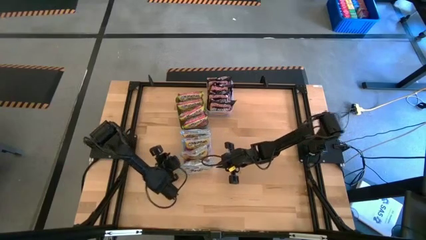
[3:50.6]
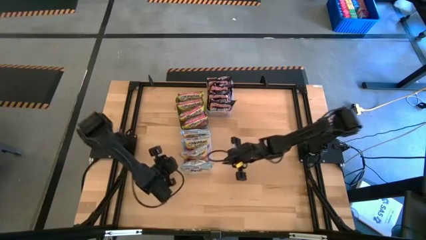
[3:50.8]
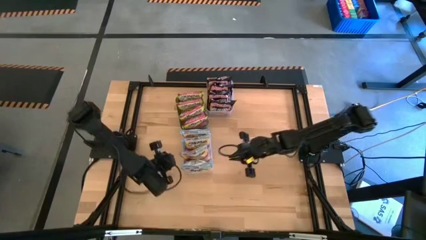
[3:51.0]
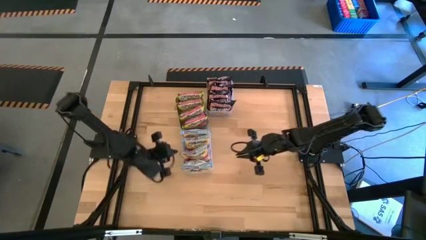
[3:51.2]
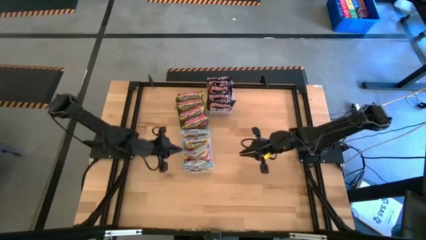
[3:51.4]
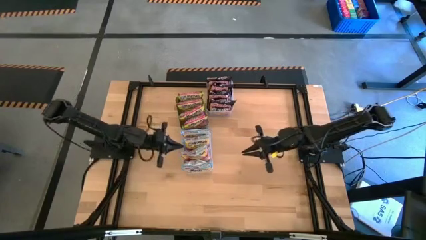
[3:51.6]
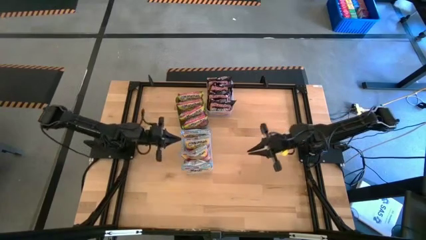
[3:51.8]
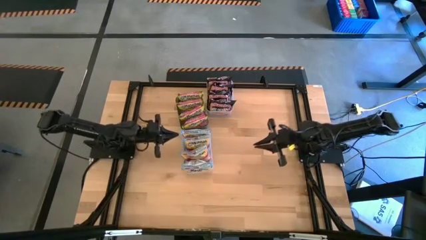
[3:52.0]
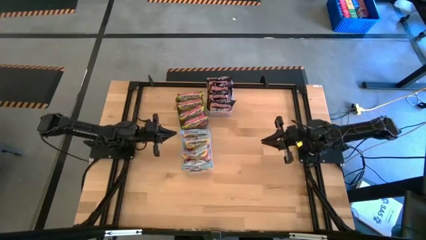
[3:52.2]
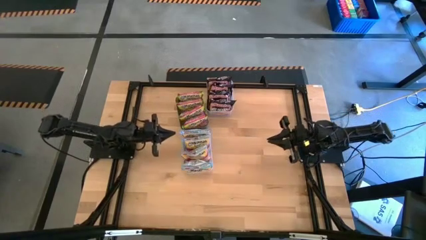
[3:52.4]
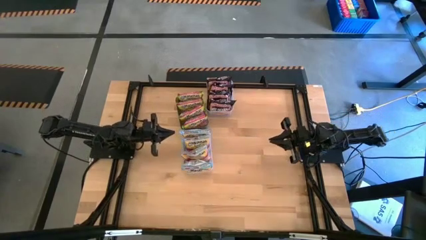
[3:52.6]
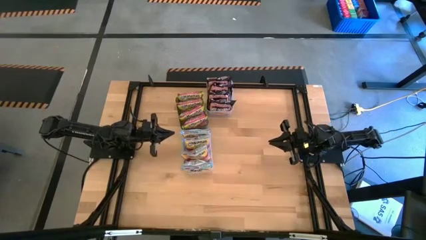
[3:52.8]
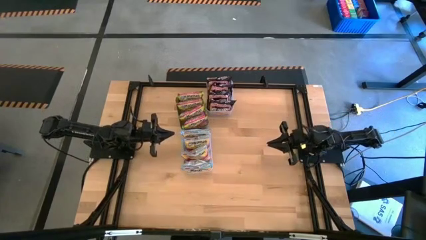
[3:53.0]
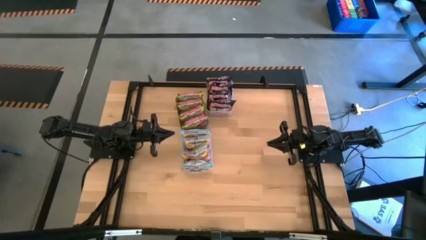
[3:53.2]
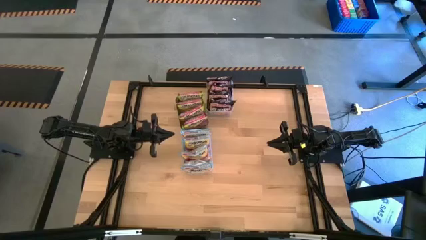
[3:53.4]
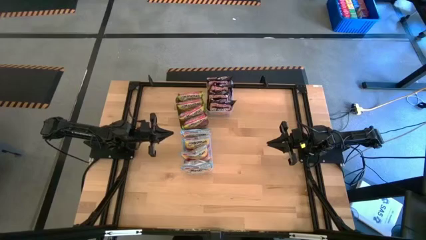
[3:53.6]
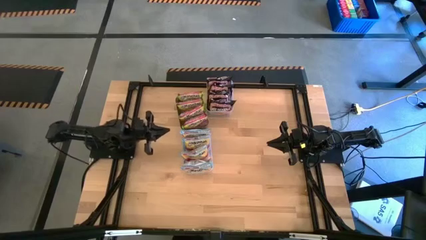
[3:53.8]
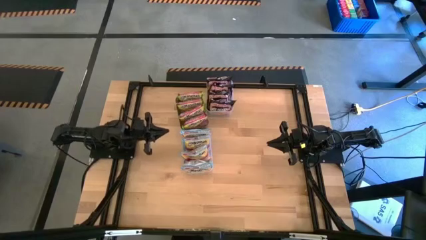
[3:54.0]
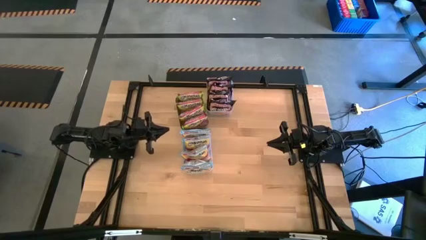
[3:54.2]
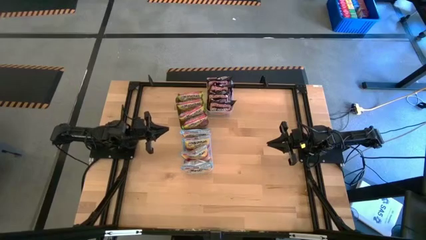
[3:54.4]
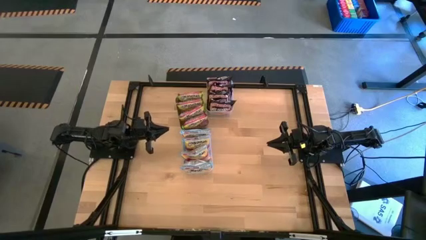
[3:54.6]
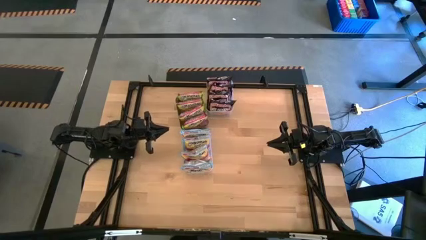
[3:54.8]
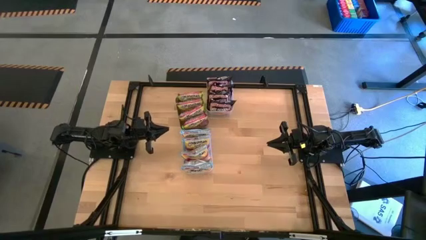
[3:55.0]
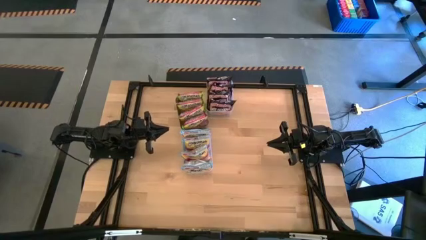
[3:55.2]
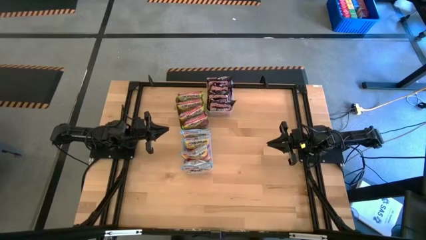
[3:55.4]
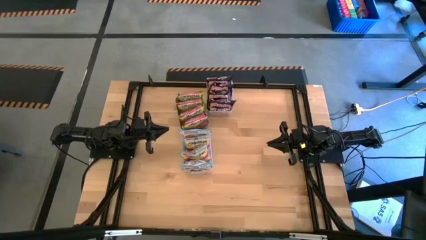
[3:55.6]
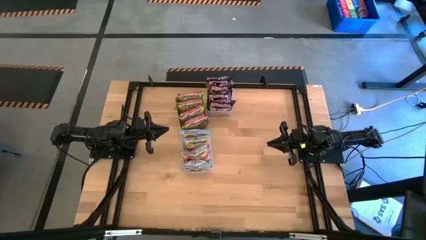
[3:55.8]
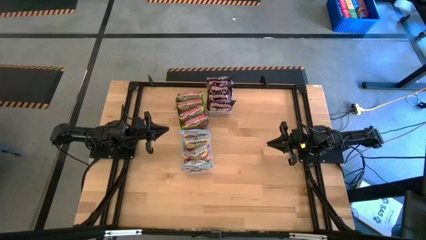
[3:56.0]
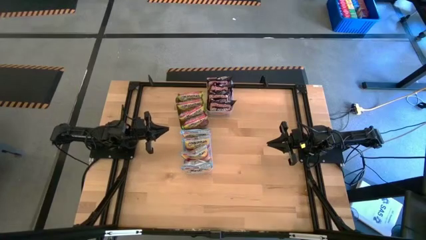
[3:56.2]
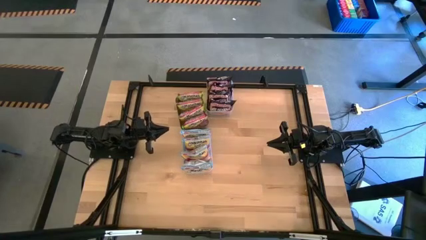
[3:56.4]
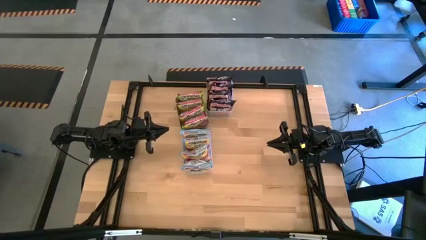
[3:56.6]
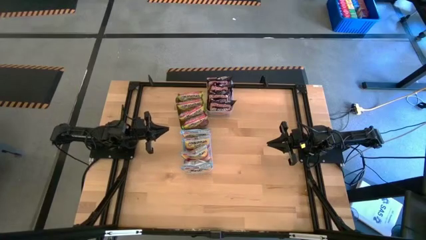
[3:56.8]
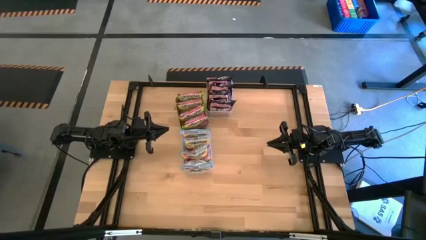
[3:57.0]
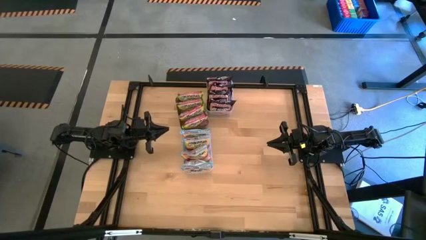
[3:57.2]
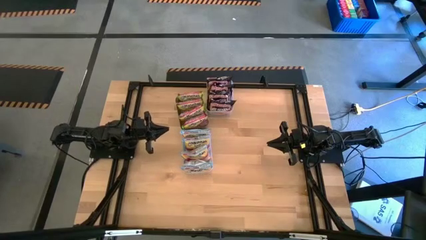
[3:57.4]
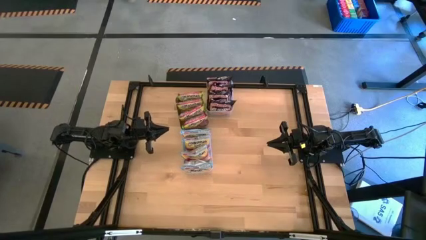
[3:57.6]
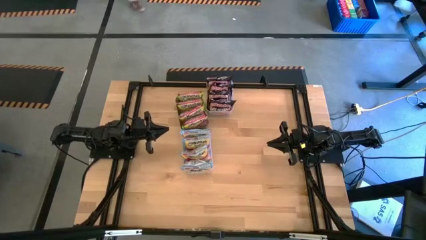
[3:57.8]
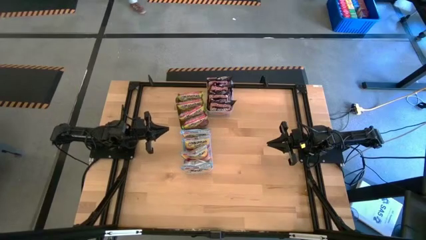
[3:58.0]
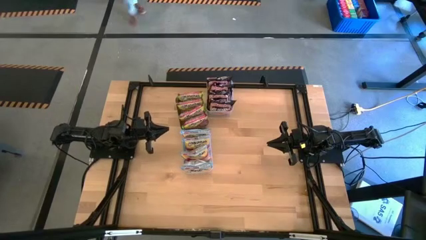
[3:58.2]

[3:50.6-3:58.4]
Task: Sort Maruchan noodles
Return to Home Position

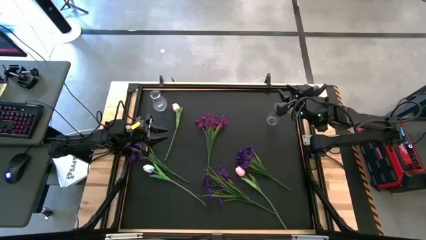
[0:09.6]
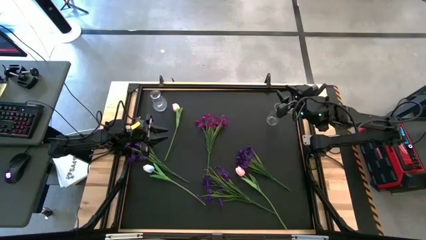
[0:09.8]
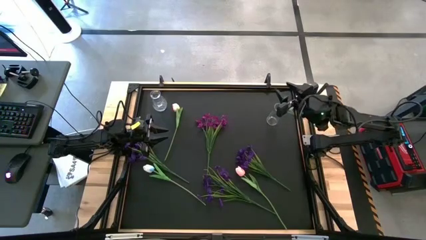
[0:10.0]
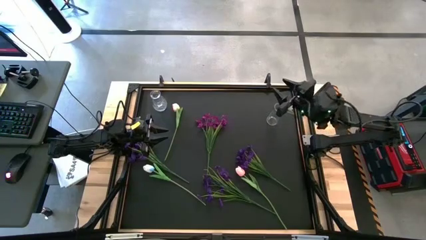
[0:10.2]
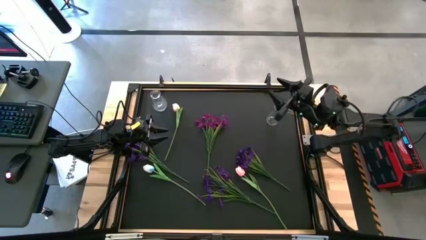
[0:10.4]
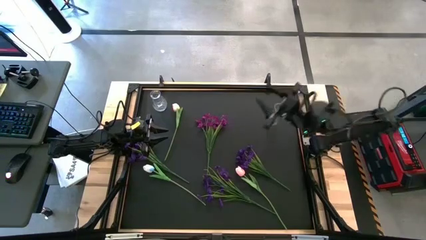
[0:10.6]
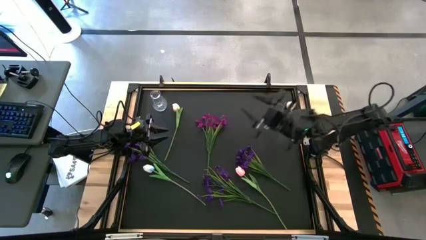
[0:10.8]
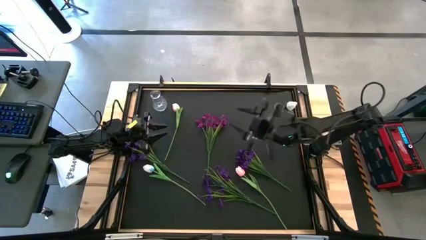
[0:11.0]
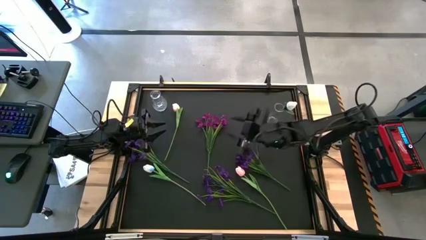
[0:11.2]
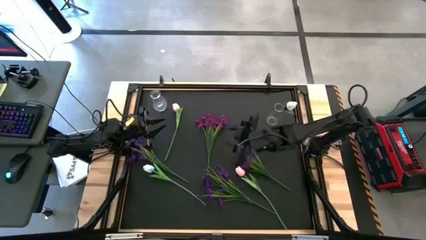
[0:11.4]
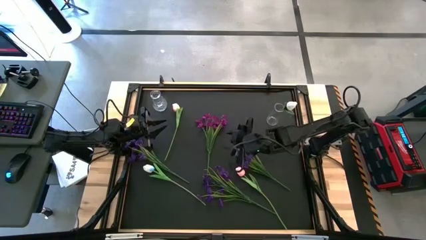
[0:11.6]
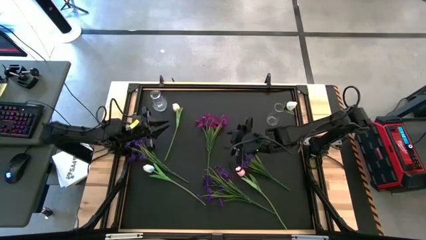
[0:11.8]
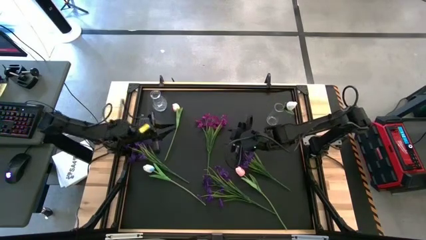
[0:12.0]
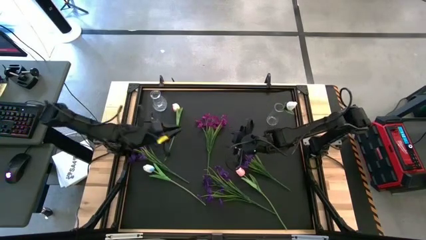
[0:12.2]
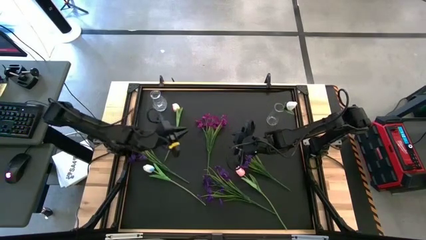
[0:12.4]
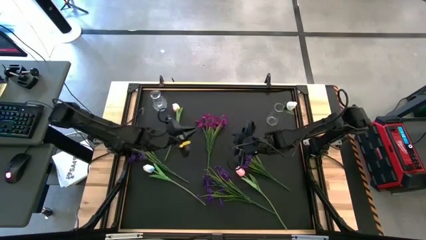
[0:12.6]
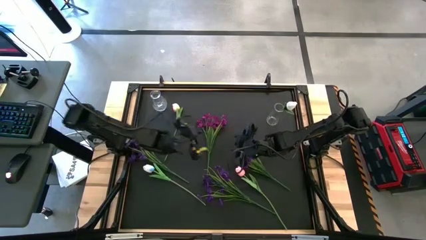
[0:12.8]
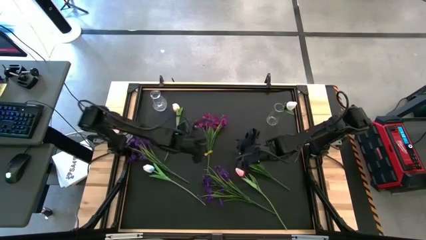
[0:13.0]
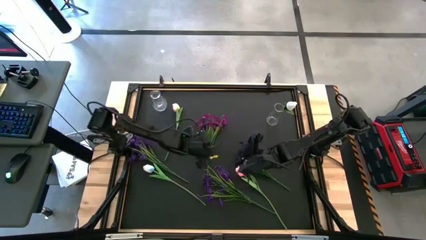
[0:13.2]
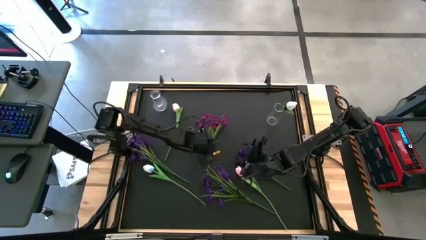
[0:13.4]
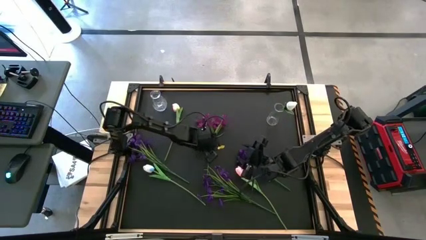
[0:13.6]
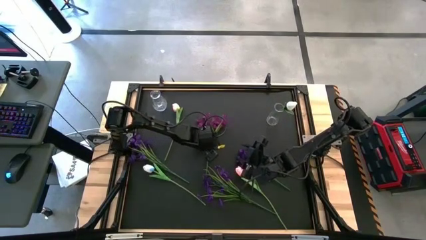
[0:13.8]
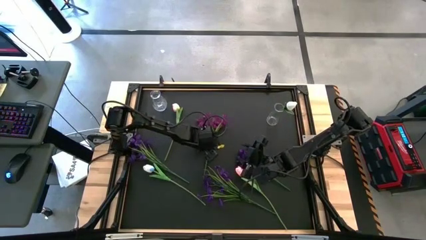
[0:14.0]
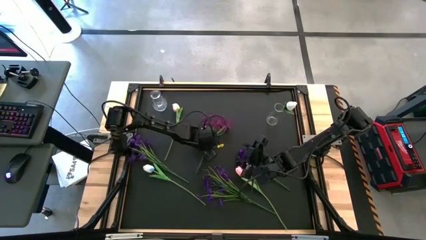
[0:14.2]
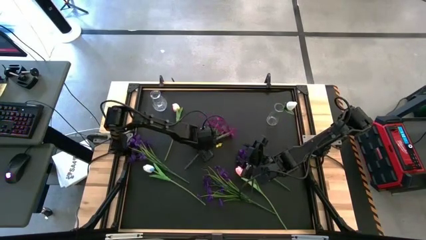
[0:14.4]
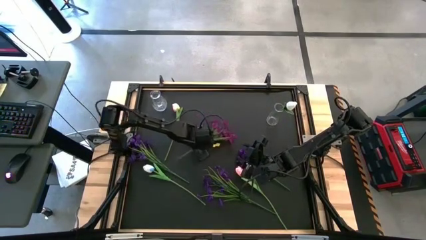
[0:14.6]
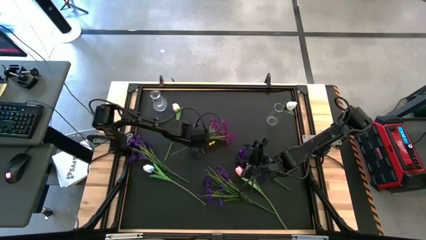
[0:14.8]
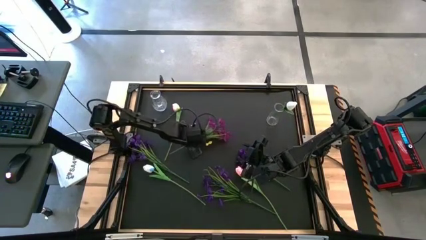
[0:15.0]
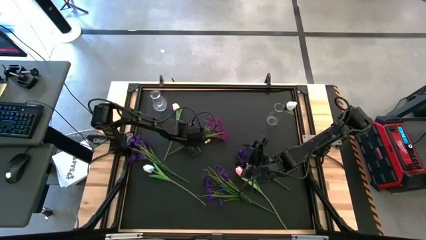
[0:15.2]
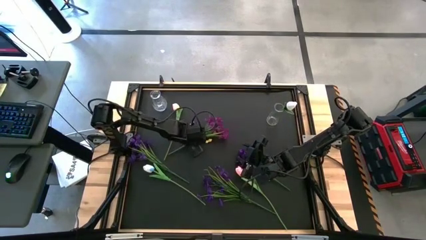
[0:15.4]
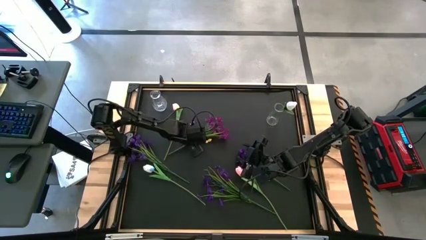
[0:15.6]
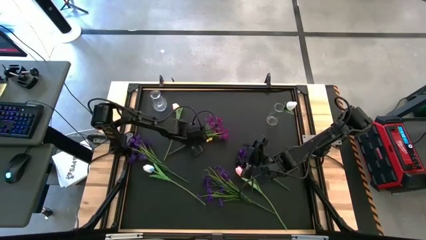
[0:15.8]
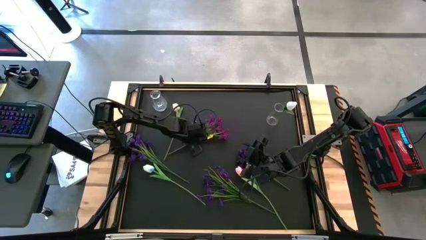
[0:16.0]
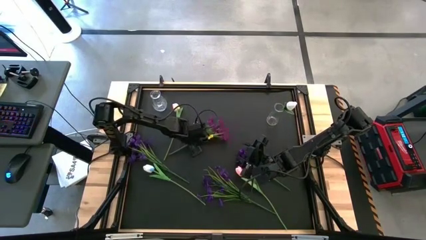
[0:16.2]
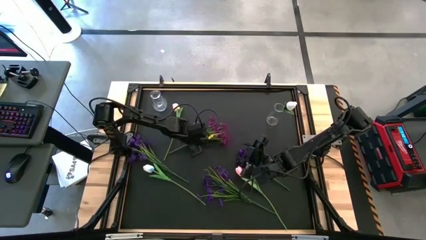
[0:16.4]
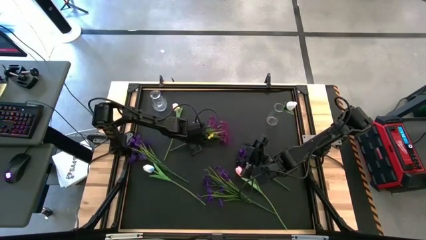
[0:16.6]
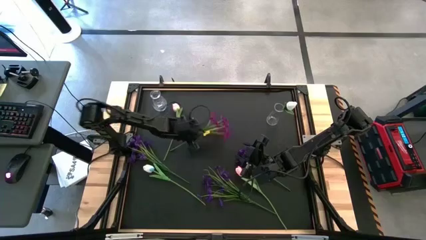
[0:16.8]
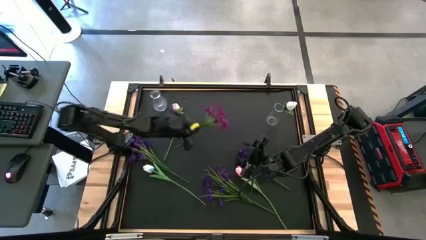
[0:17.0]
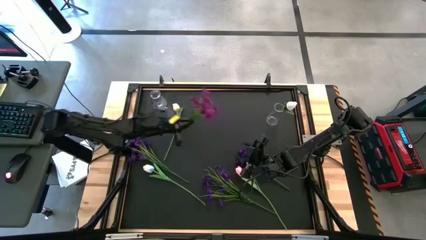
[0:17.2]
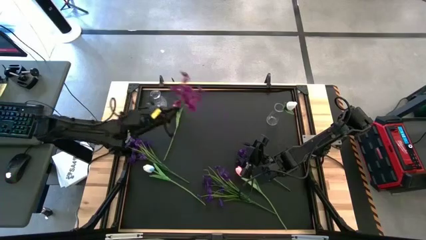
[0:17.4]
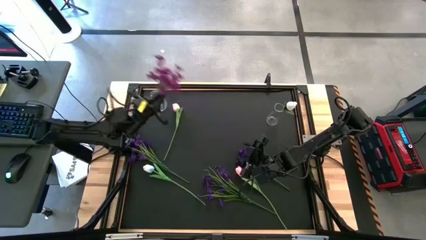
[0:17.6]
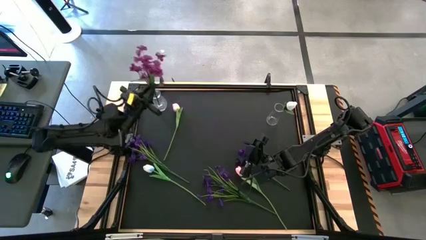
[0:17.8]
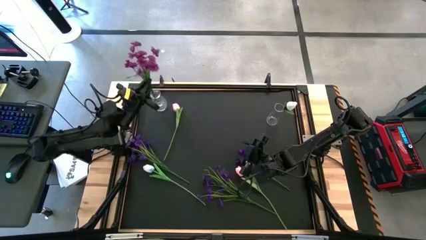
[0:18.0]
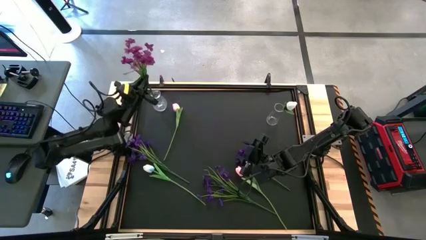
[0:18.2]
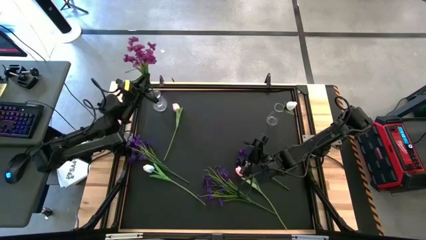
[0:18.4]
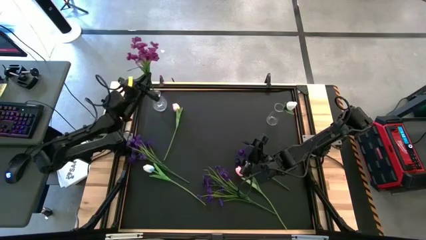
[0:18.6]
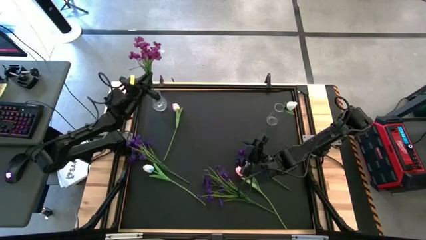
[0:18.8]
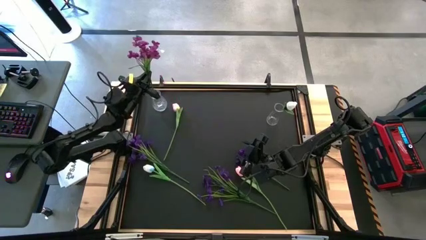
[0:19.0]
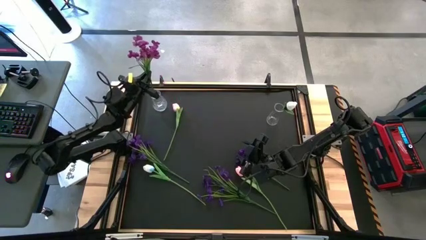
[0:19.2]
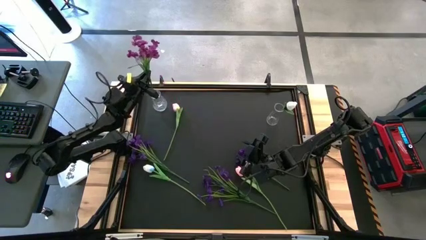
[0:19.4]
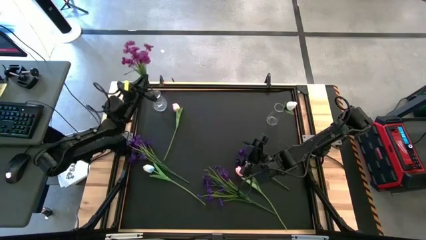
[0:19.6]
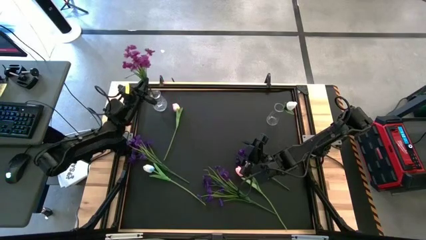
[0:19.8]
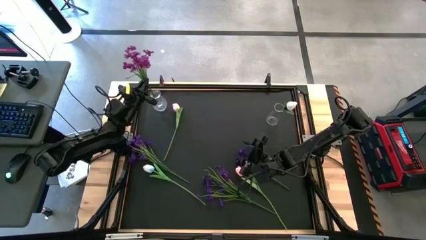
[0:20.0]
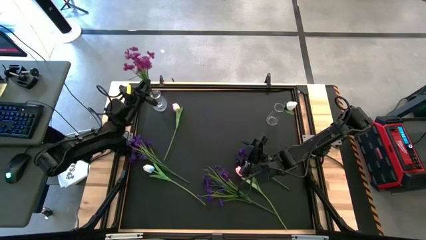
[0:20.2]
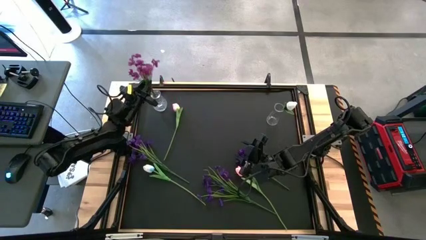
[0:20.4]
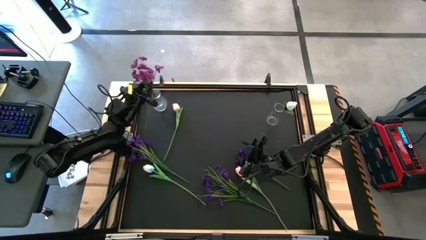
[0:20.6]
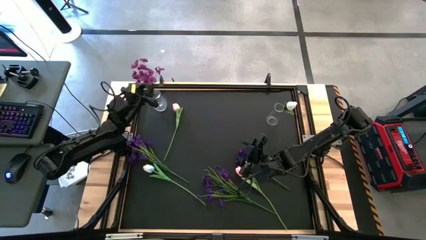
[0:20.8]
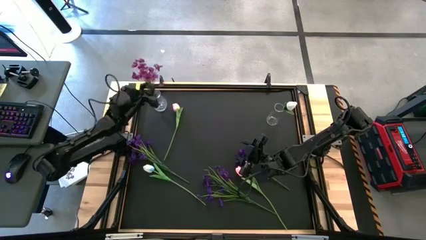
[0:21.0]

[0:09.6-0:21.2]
Task: Sort flowers into vase by color
Put the pink flowers into the left transparent vase
